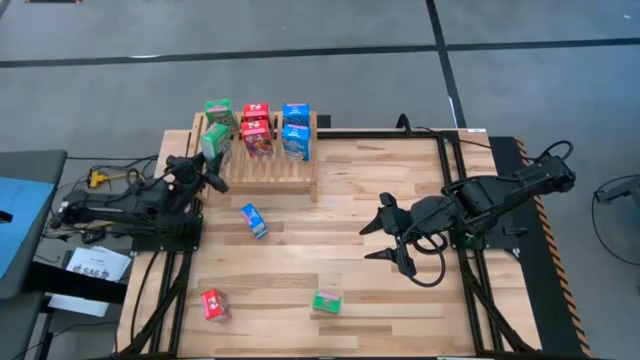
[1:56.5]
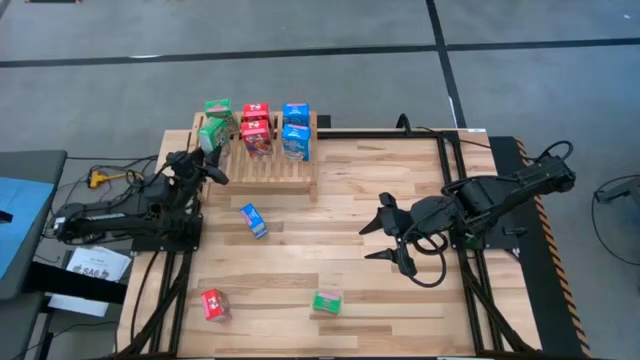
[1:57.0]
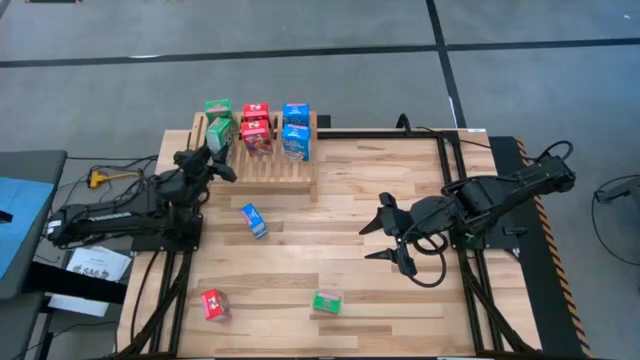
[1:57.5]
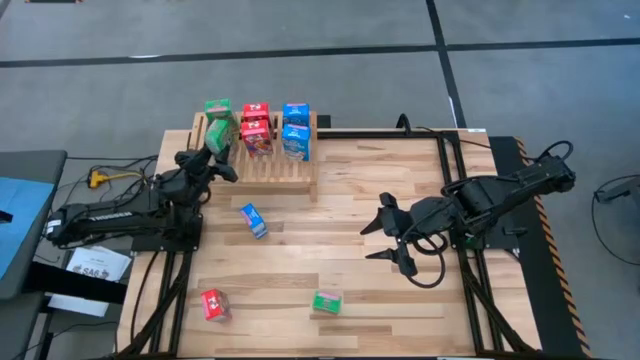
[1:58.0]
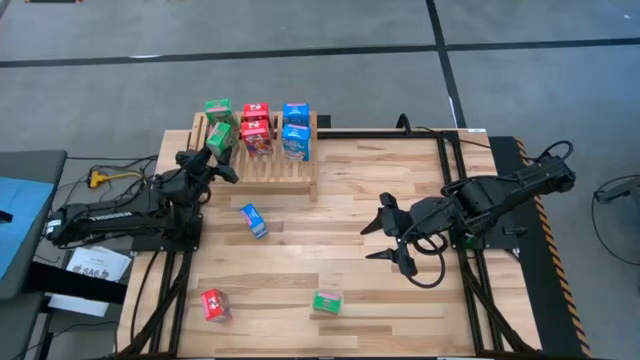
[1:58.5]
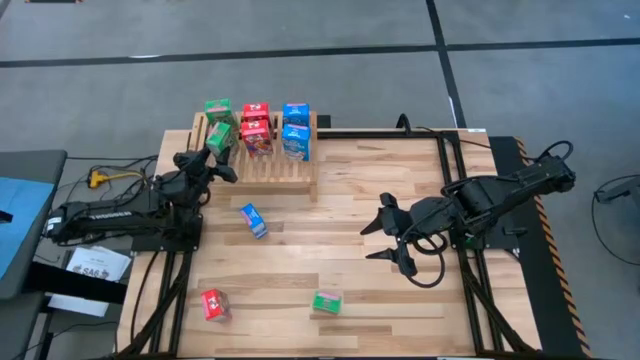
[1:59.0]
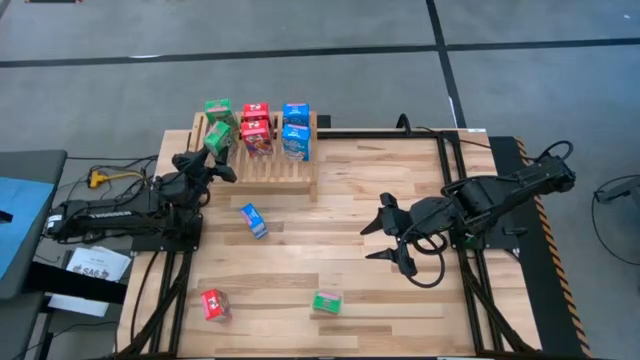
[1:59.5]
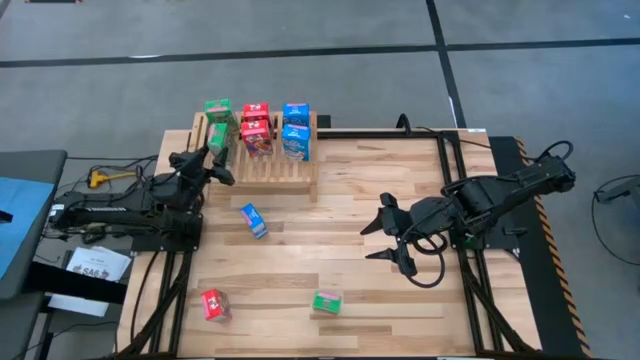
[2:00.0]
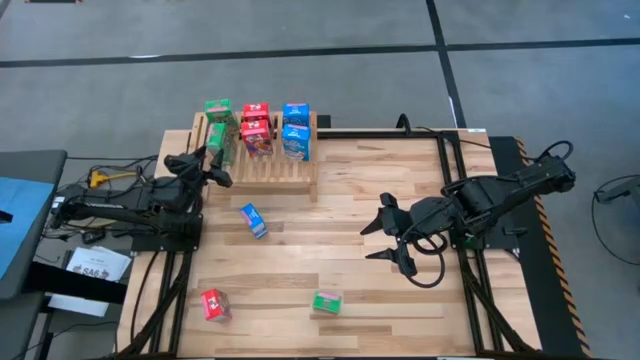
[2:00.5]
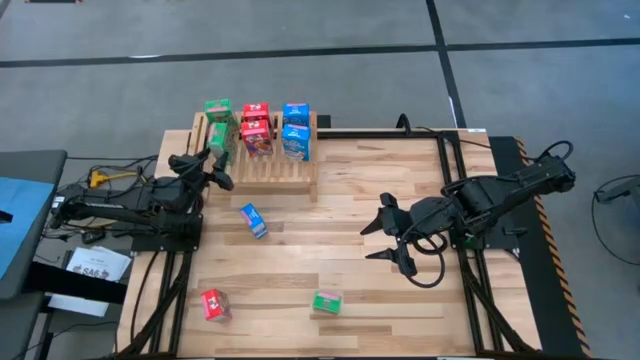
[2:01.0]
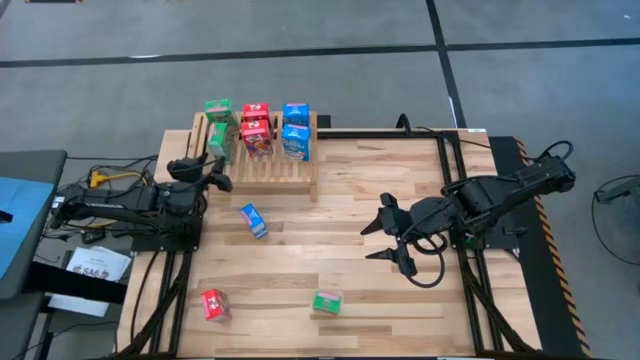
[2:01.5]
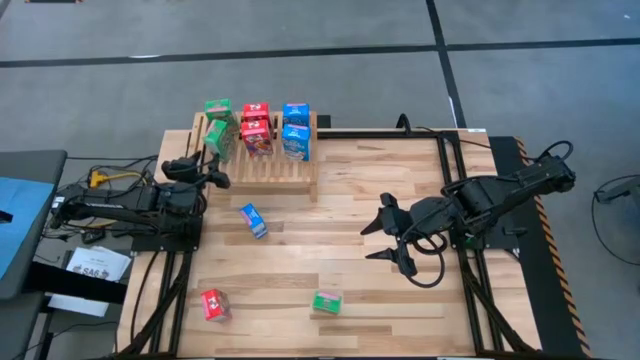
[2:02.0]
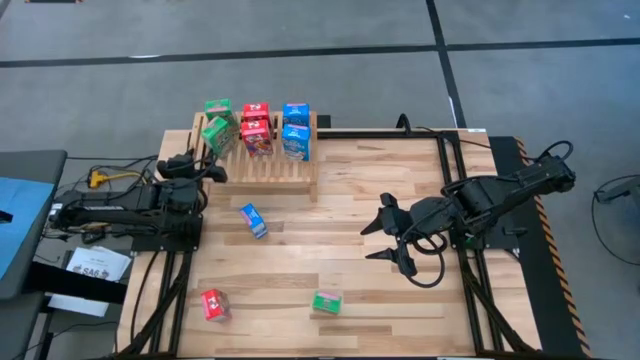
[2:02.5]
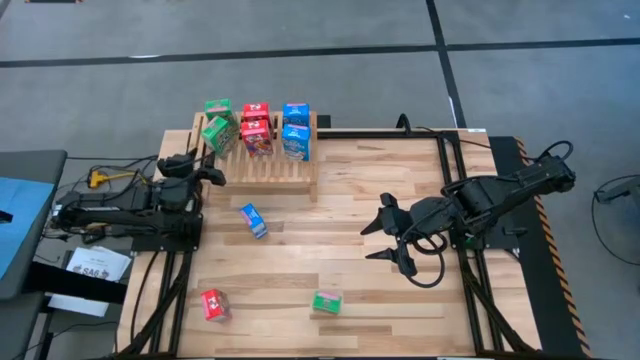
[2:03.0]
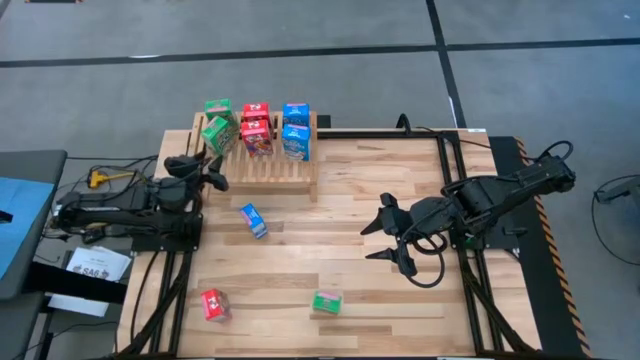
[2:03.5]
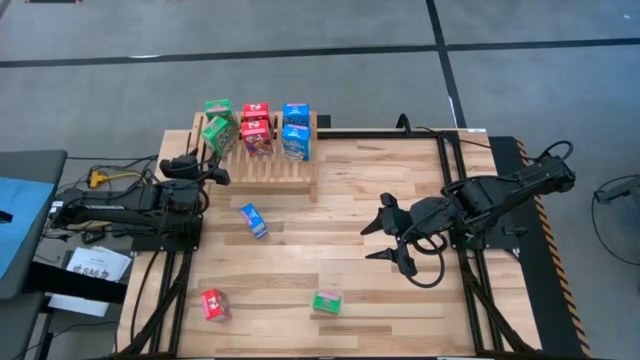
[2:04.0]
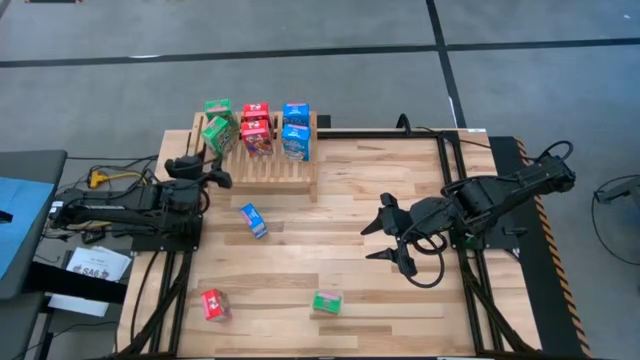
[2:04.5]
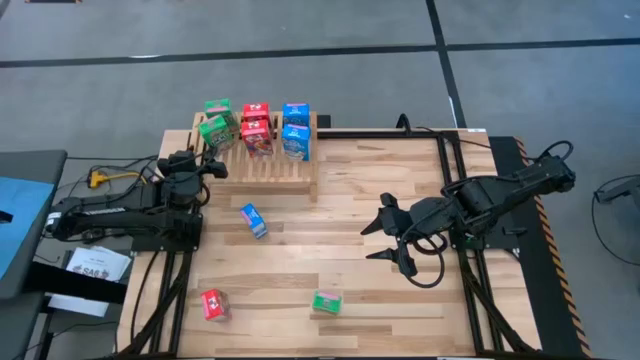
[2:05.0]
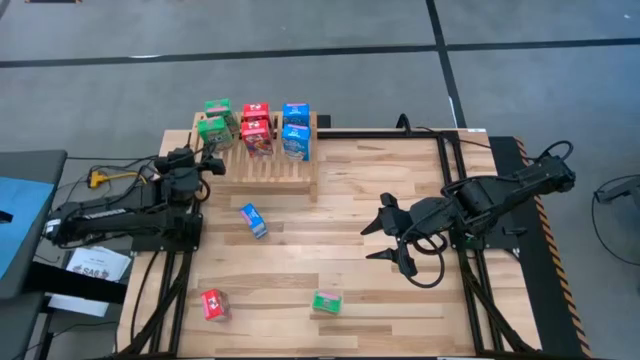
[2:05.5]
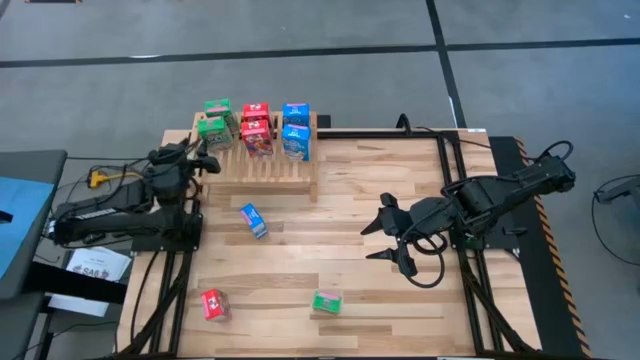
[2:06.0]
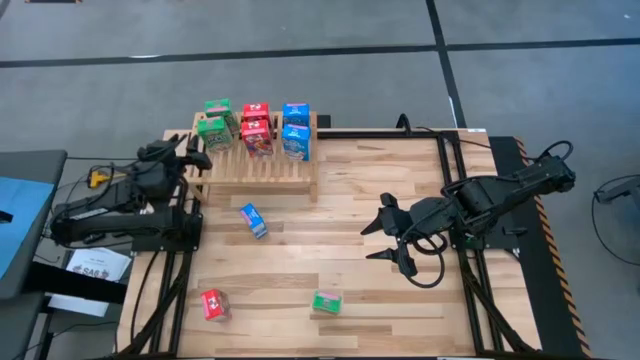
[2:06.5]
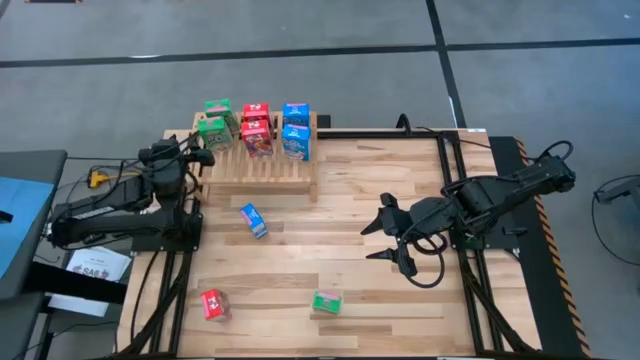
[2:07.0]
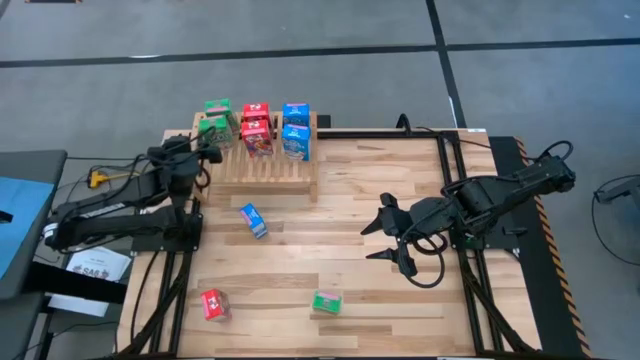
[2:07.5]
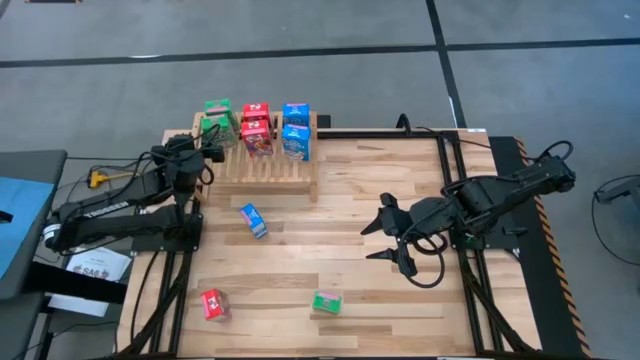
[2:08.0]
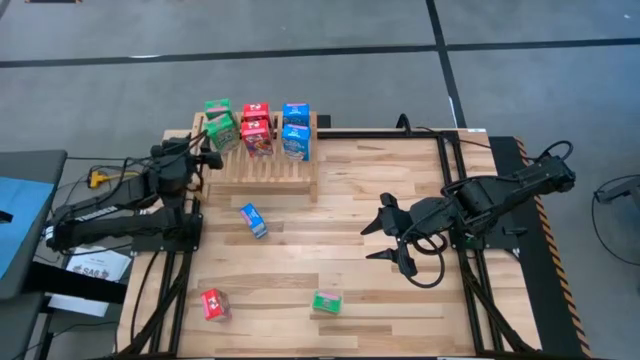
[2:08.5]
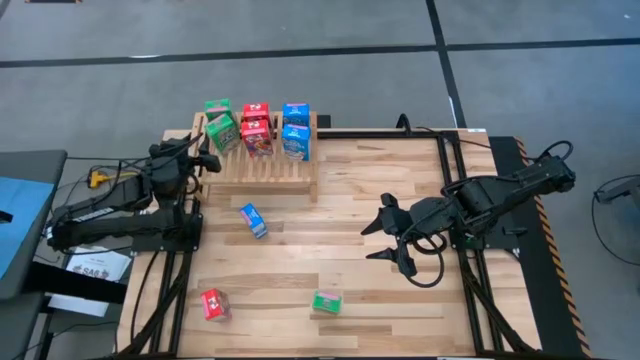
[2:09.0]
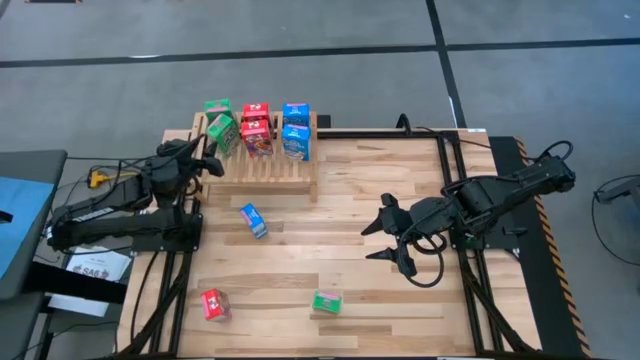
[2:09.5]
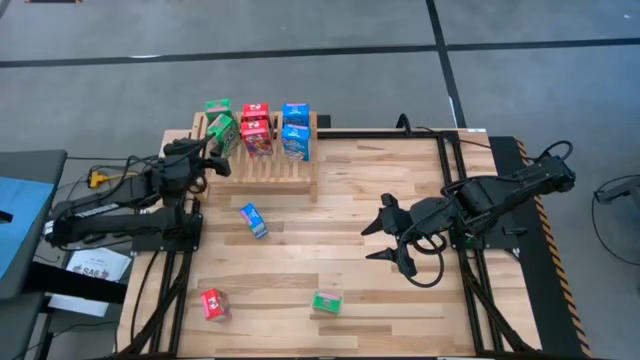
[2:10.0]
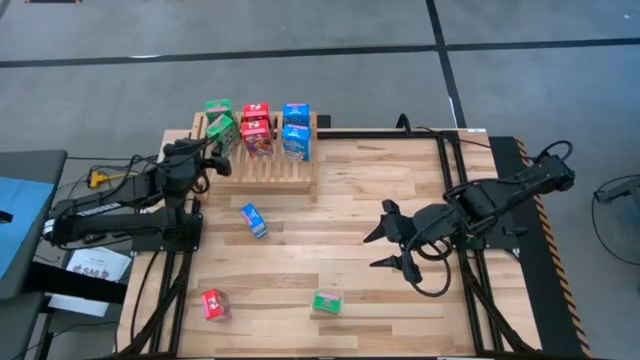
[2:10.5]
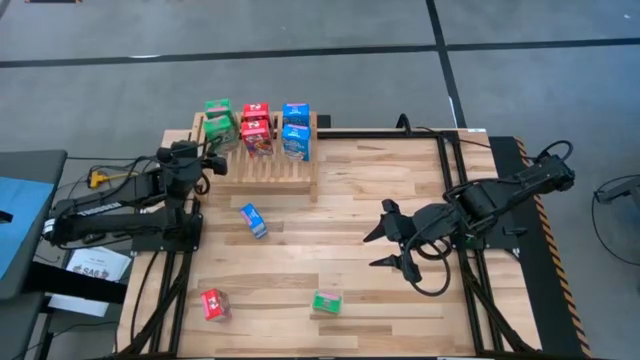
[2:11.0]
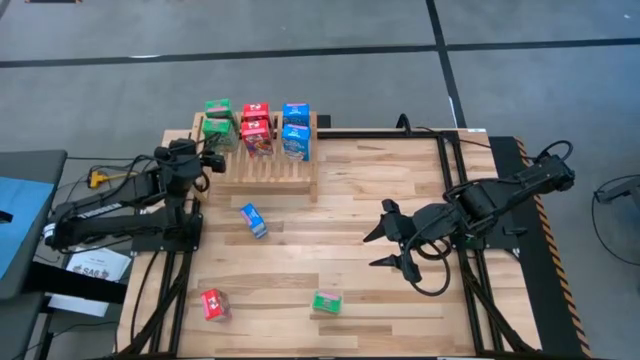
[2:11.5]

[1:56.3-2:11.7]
Task: Stack cereal on shelf
Put the right green cereal box on the shelf aligned with the other green cereal box

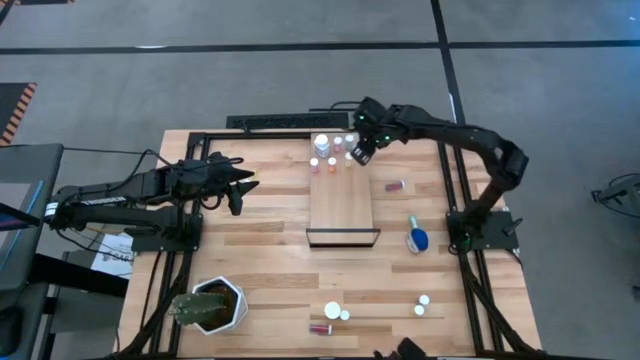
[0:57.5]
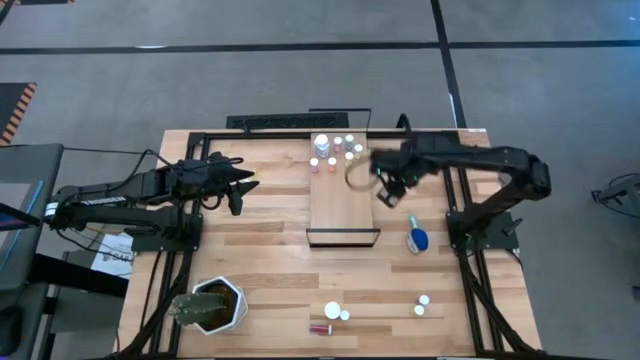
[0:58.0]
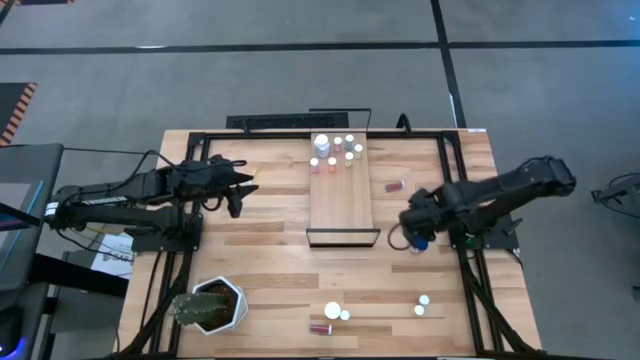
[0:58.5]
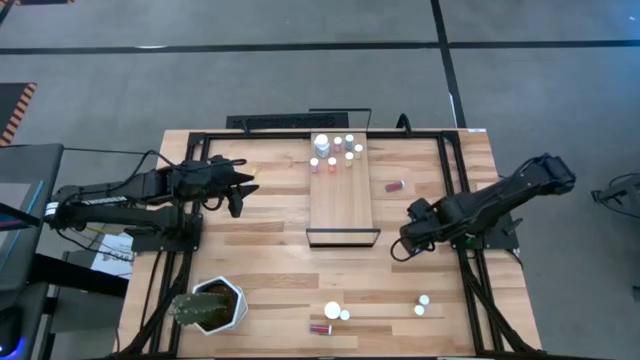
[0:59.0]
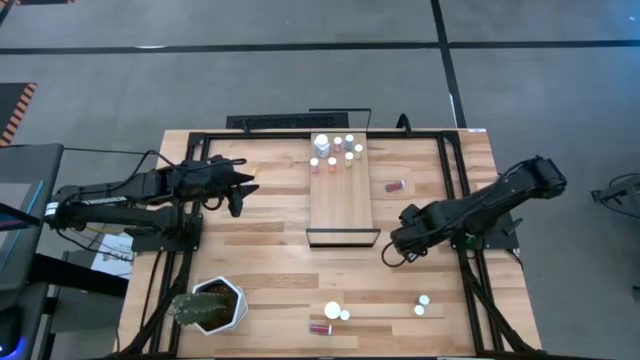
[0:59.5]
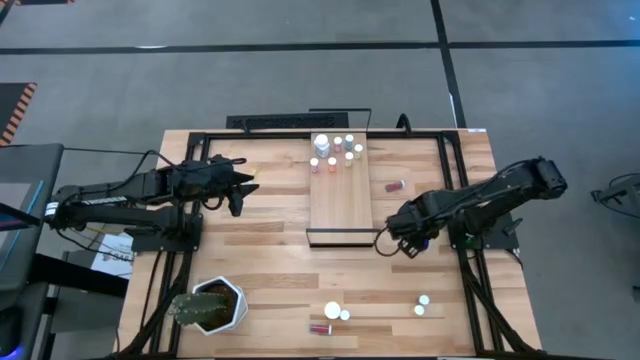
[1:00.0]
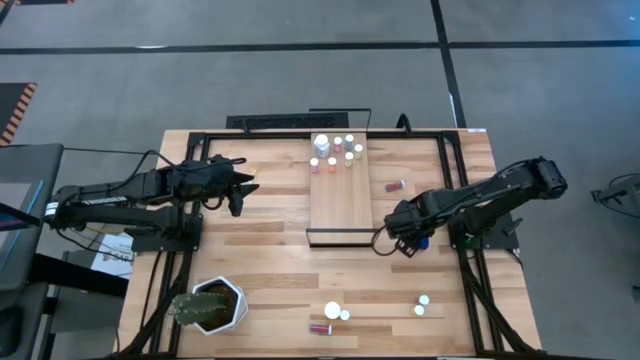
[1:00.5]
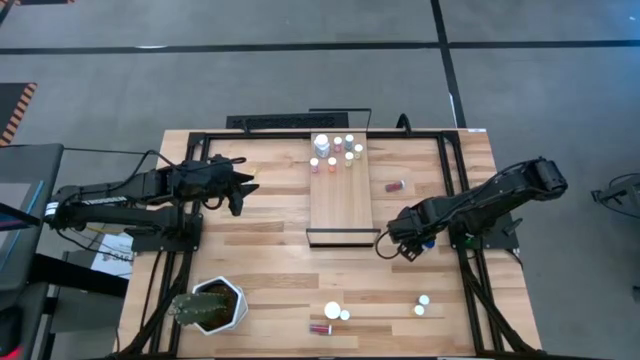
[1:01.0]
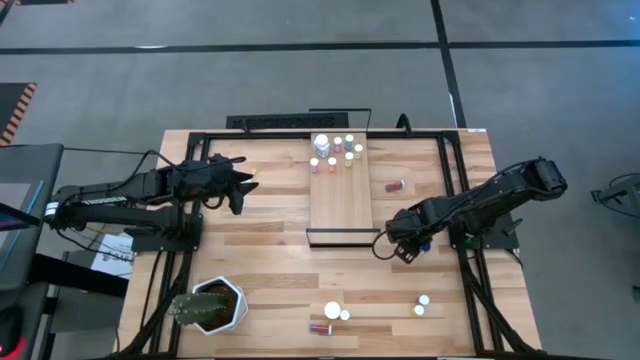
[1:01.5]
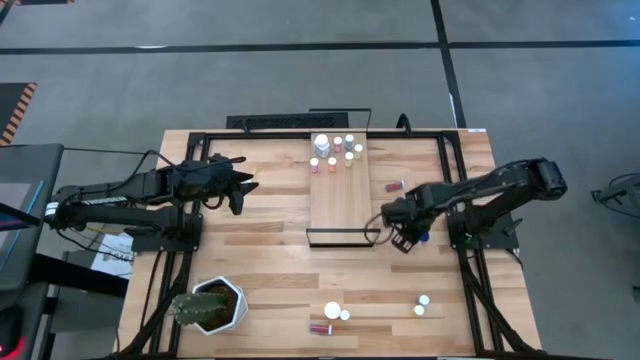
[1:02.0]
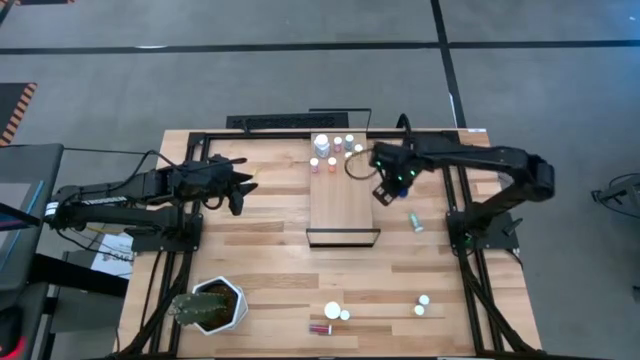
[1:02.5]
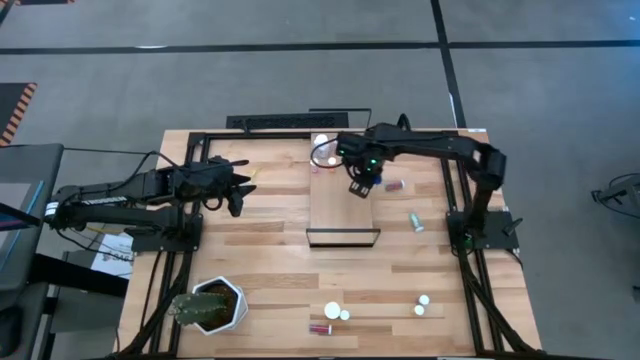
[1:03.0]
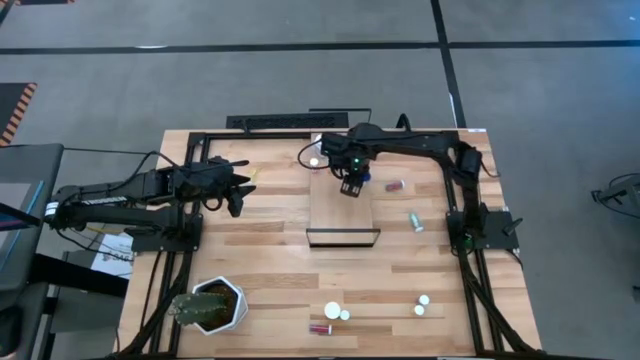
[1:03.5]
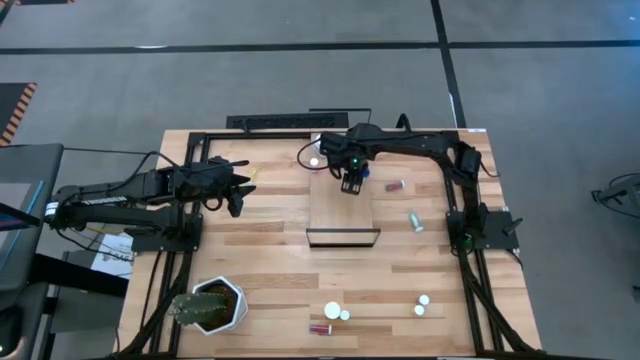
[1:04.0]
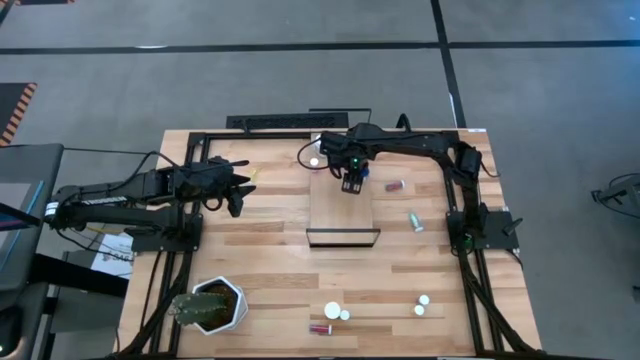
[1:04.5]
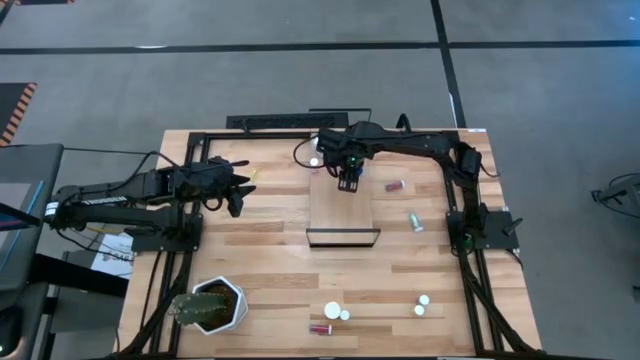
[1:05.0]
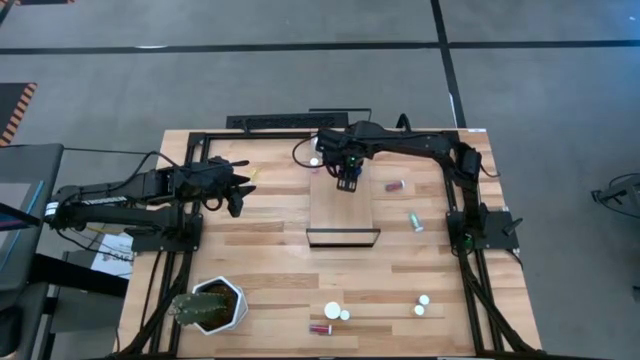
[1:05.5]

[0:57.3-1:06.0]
Task: Pick and place medicine bottles onto shelf by color
Put the blue pill bottle on the shelf
